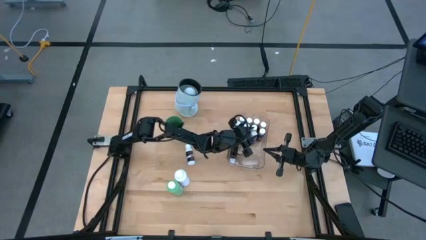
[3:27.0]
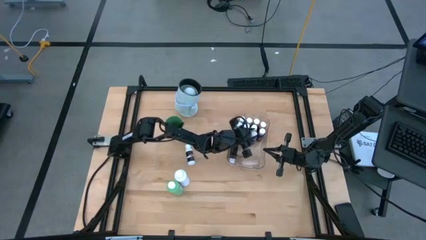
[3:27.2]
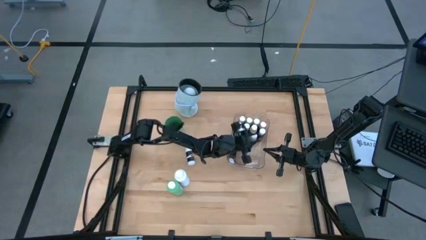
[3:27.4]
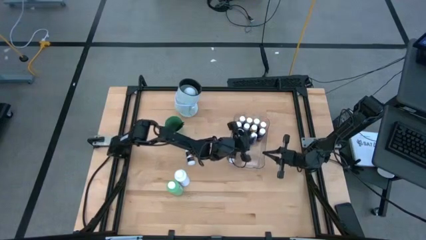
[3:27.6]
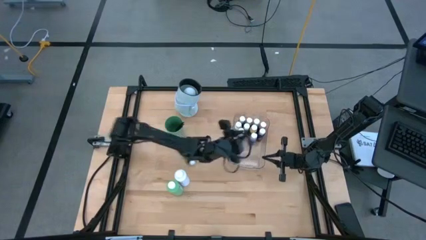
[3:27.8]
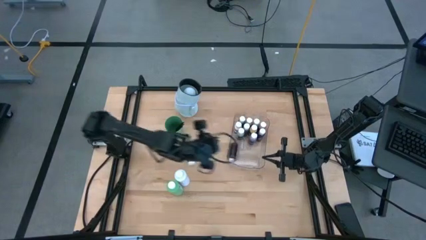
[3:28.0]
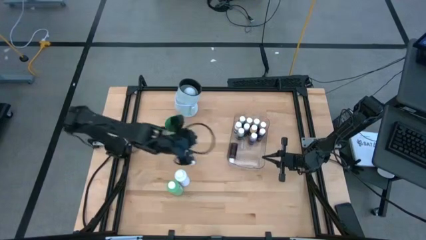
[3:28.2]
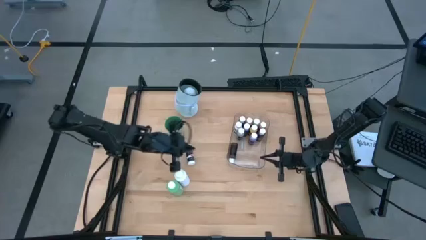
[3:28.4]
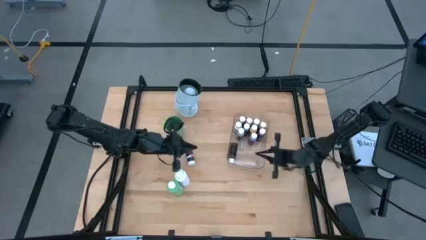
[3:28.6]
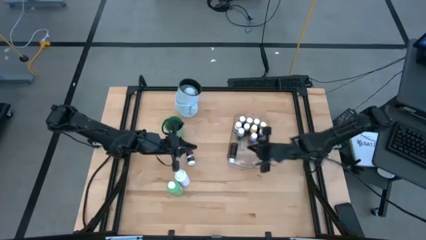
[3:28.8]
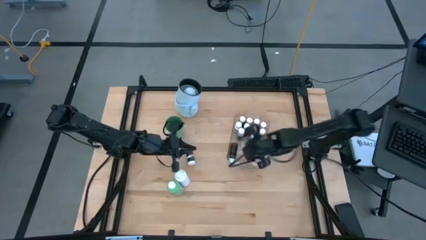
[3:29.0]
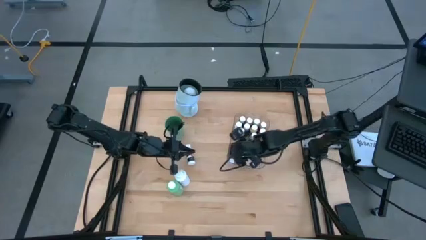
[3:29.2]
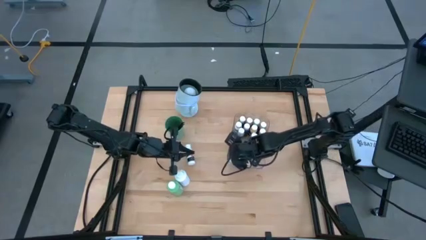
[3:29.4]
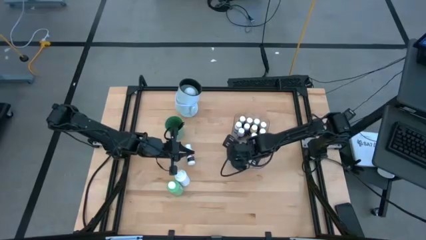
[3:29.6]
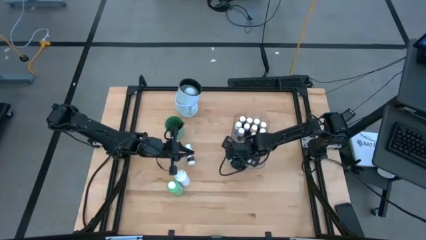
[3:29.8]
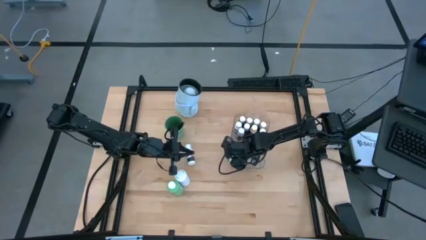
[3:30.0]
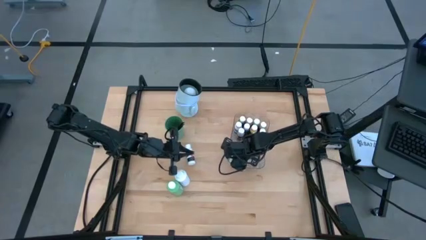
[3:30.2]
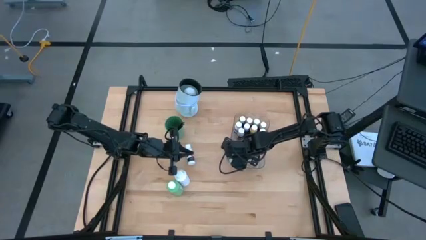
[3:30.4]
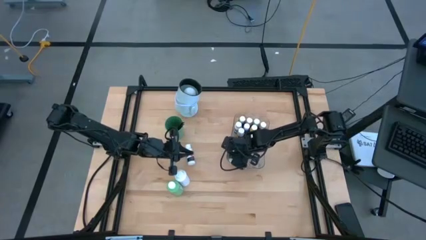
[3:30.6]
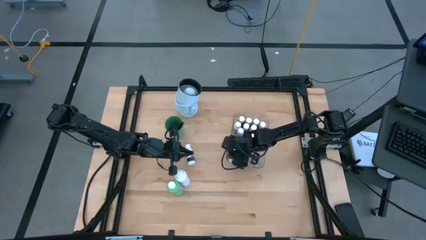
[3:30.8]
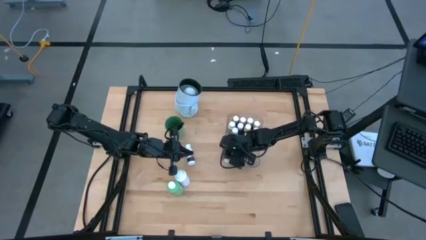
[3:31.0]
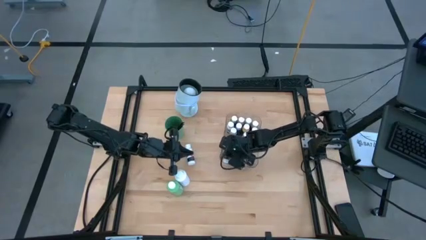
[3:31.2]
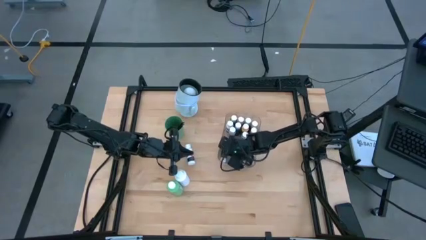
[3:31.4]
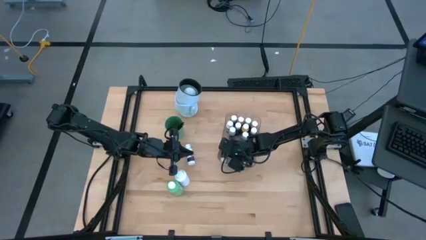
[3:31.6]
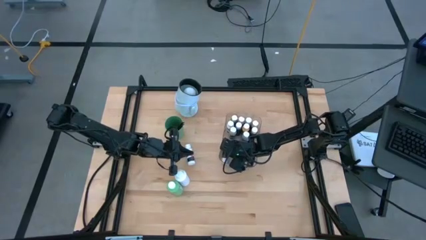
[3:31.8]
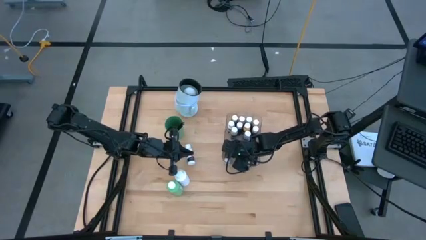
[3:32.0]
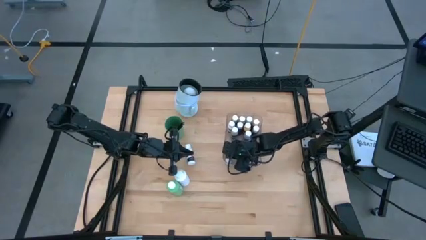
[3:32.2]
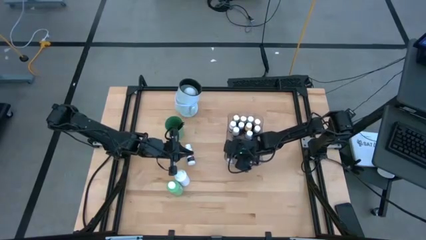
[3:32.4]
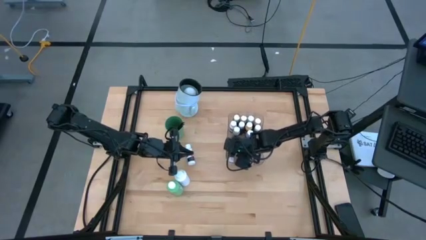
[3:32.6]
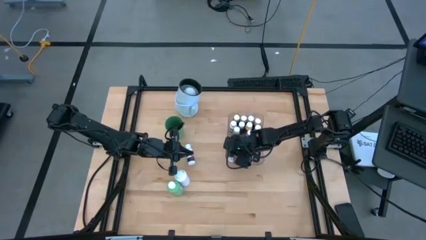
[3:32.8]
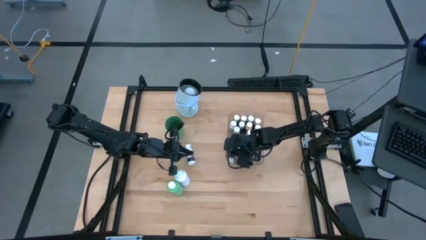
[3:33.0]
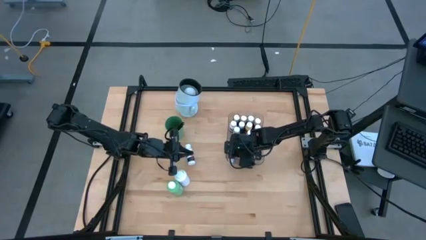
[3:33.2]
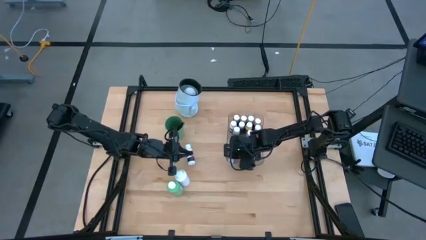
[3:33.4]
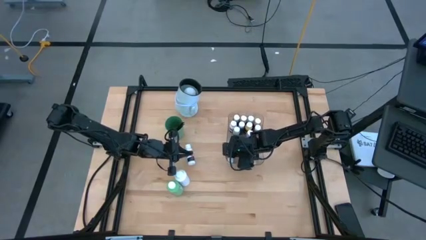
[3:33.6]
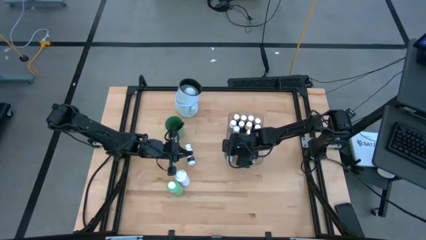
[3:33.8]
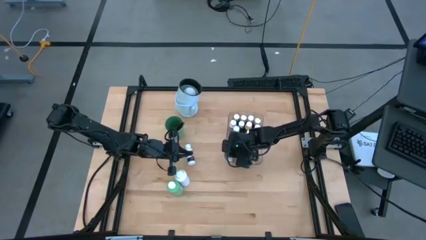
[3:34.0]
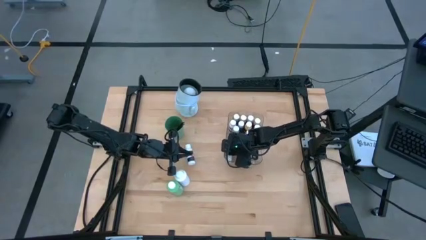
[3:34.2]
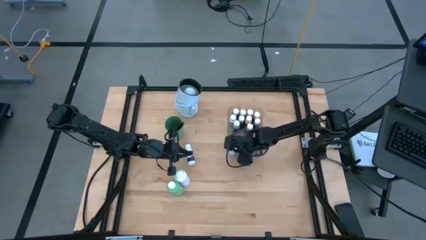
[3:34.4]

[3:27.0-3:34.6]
Task: Pick & Place Paint Supplies
Adjust the brown paint bottle into the transparent bin

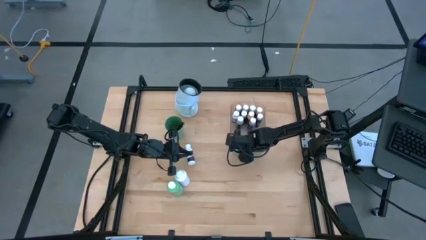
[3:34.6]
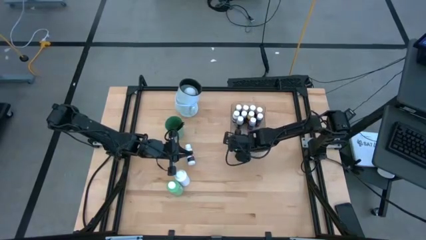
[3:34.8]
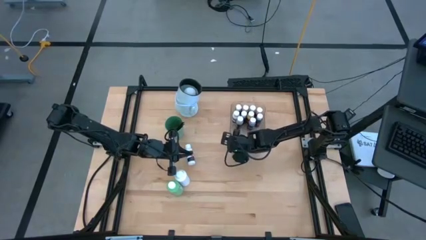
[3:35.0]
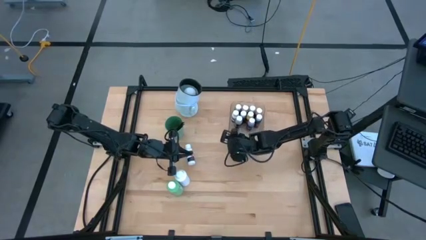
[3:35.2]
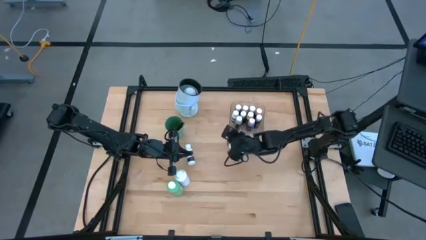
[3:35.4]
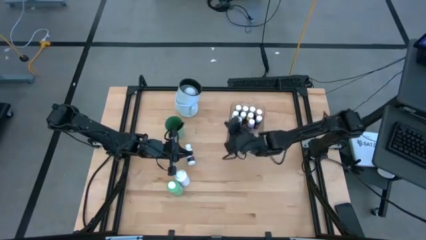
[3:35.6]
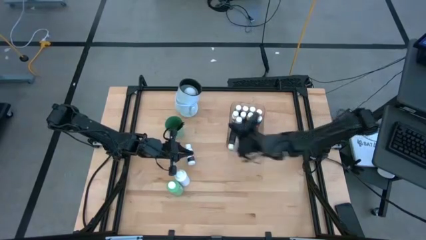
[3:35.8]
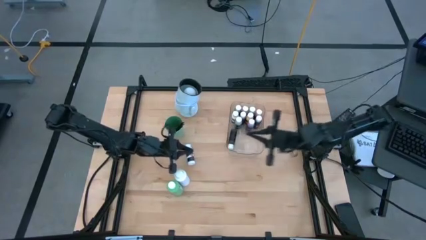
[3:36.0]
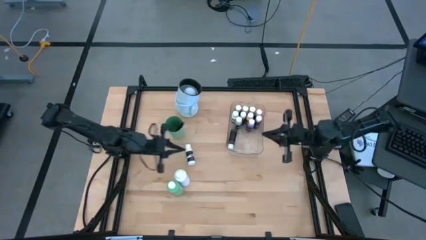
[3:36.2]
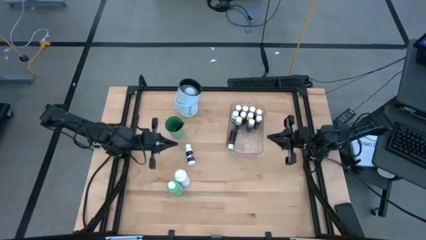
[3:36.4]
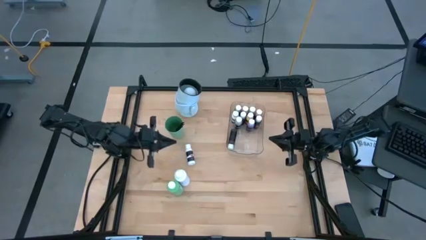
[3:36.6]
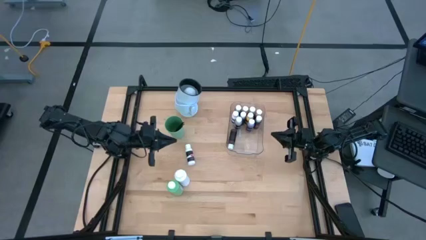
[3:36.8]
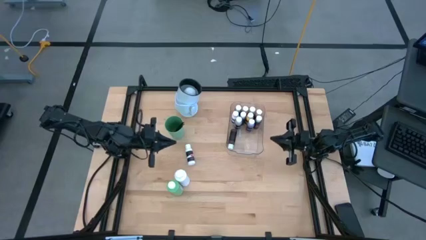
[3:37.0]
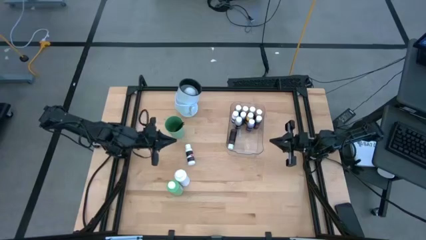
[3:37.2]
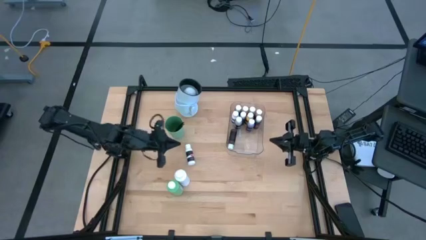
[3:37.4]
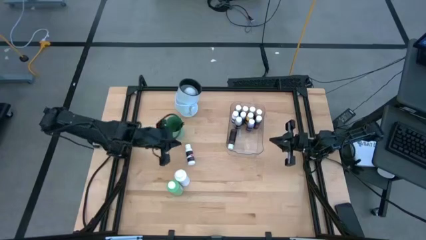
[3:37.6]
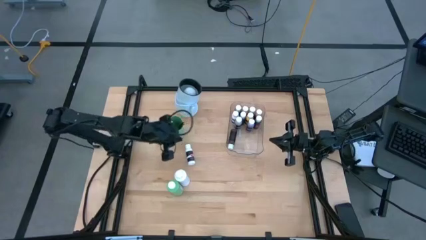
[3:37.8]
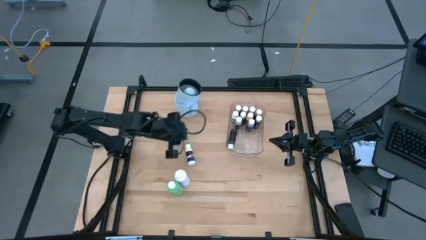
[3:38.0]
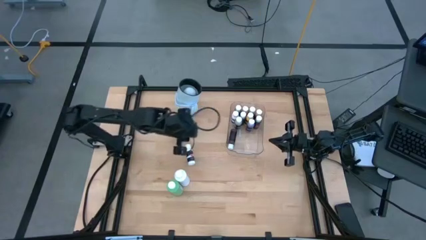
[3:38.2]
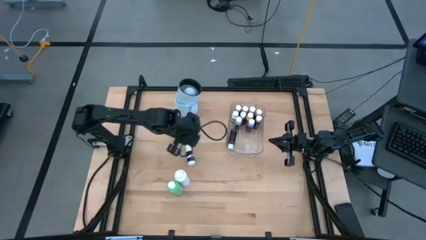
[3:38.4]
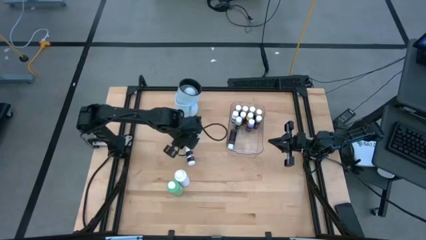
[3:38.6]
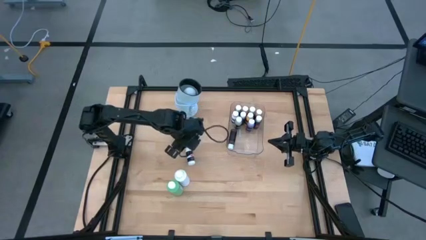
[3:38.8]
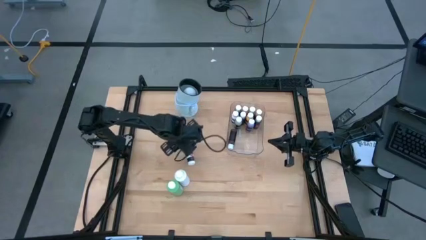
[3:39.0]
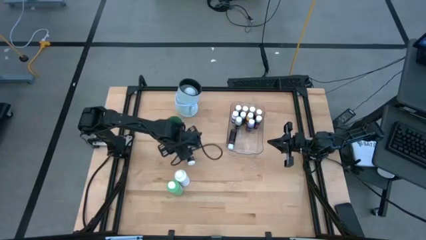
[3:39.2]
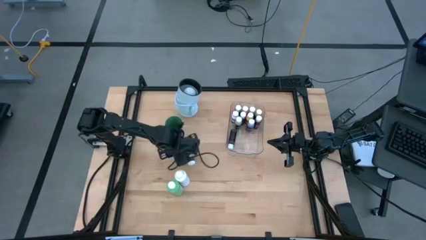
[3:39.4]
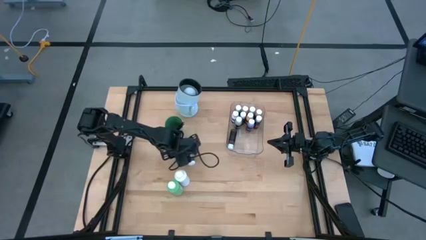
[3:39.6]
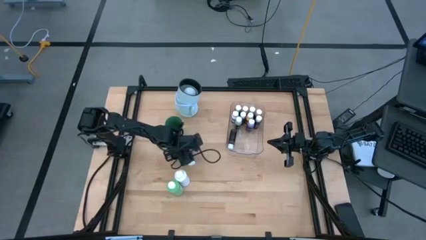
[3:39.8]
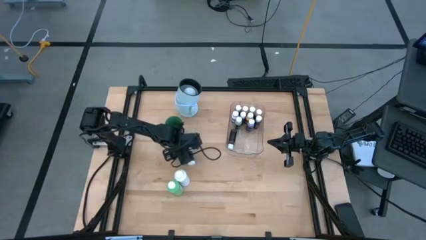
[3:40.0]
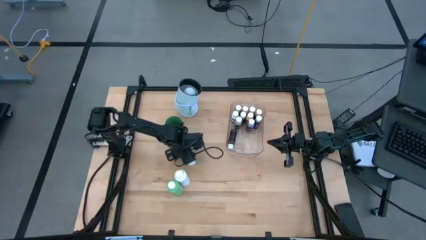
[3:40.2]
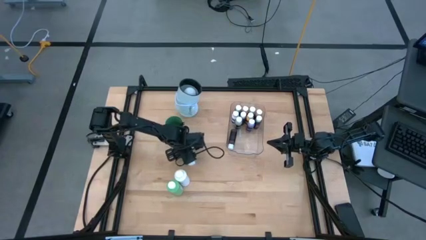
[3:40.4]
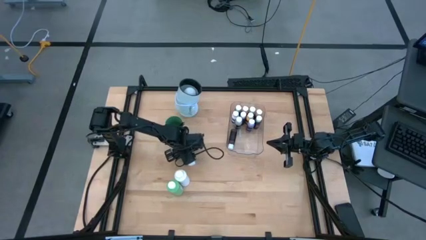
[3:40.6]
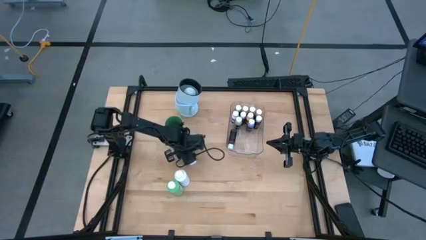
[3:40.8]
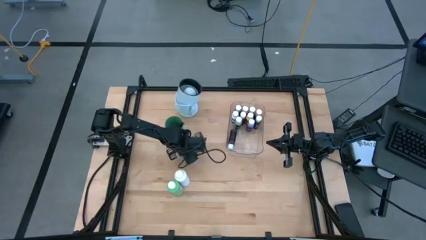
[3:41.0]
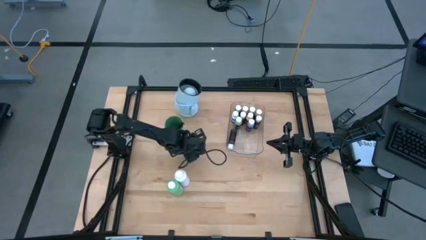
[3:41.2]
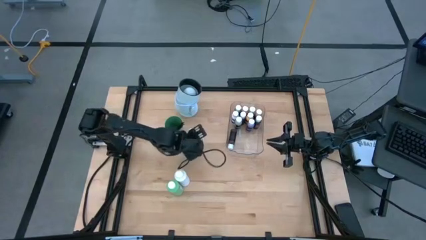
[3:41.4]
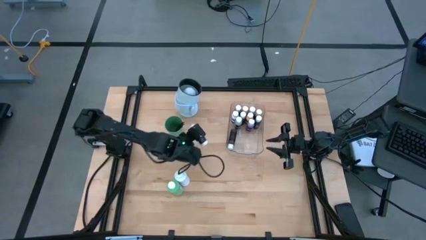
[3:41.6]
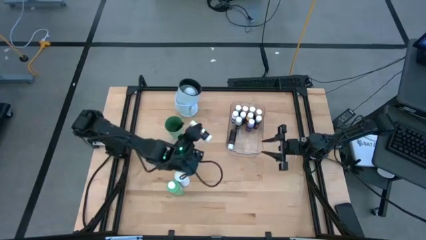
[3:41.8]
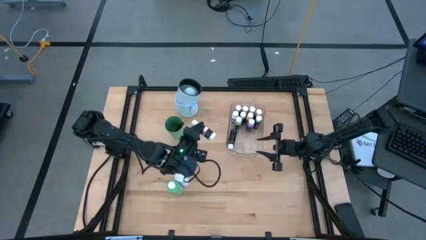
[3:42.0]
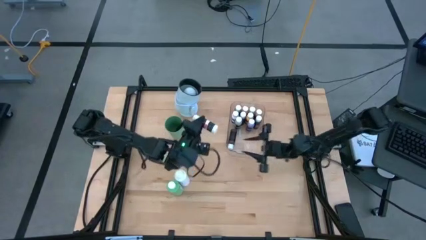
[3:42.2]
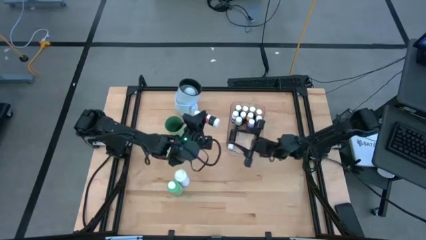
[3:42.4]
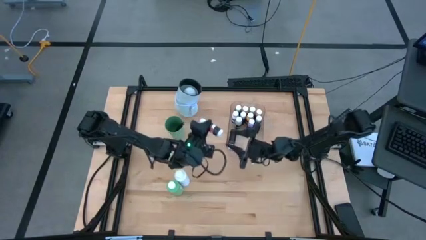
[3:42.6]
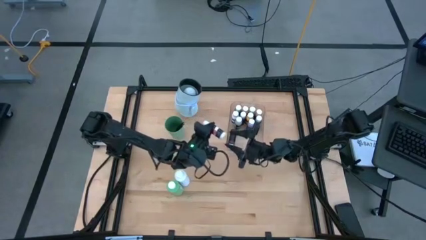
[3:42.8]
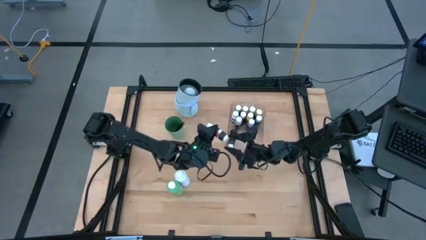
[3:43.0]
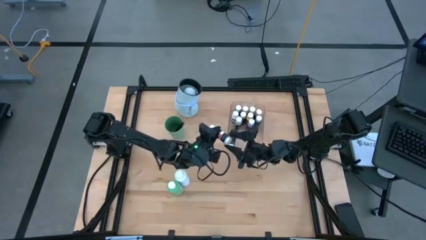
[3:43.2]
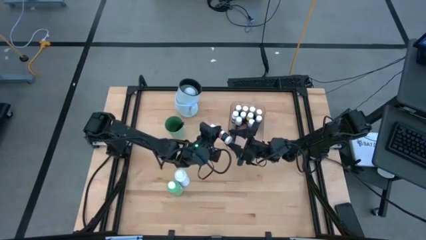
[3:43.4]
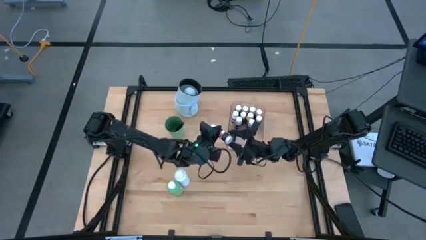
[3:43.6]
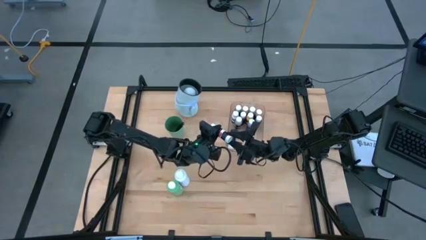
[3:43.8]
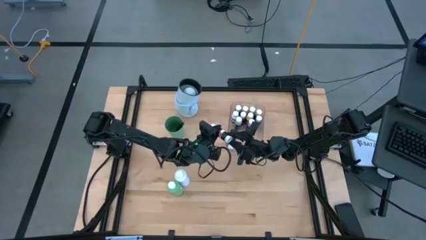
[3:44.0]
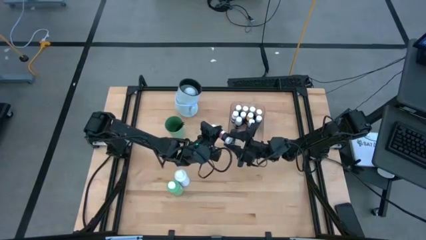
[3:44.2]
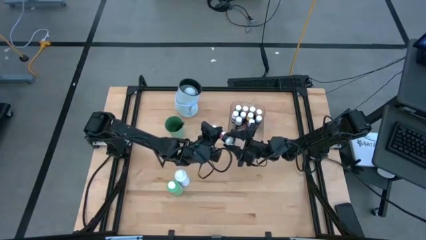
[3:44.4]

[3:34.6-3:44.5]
Put the white paint bottle into the transparent bin
